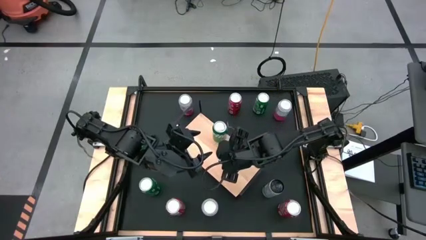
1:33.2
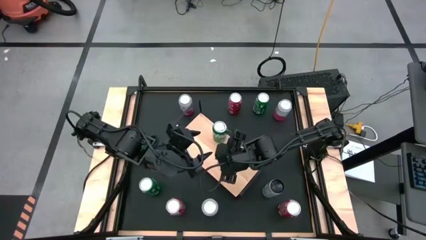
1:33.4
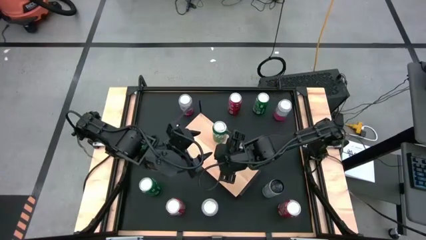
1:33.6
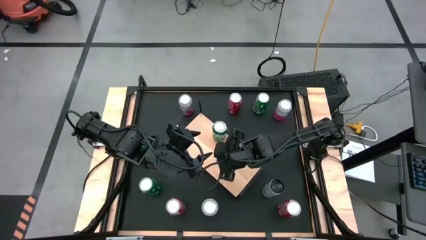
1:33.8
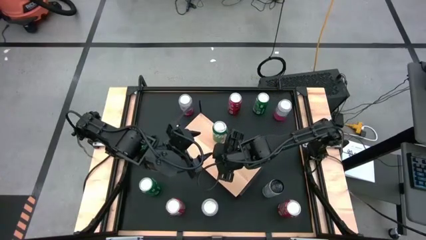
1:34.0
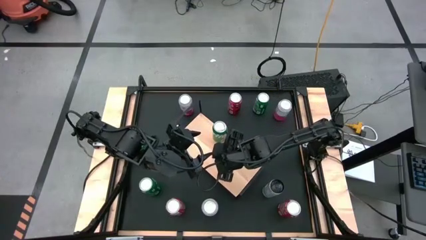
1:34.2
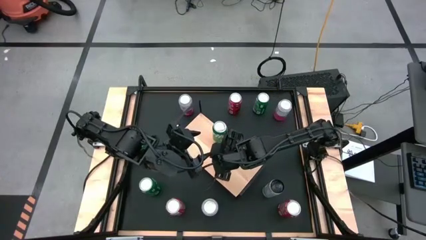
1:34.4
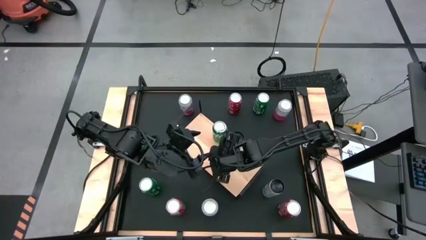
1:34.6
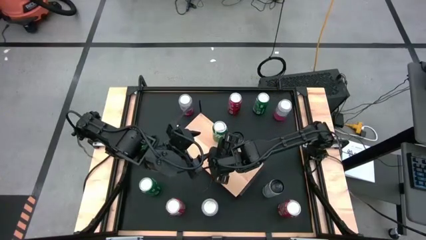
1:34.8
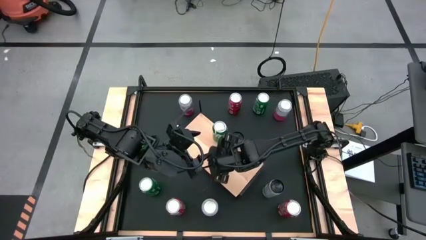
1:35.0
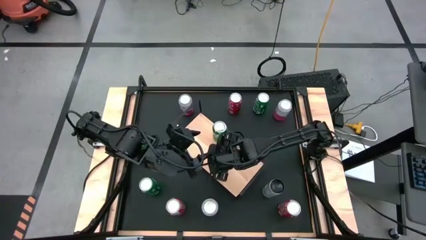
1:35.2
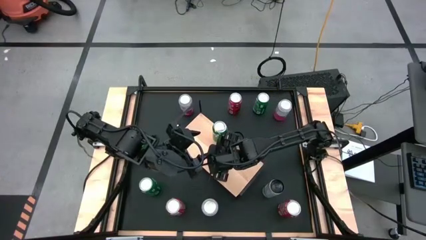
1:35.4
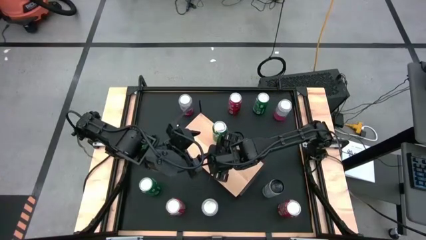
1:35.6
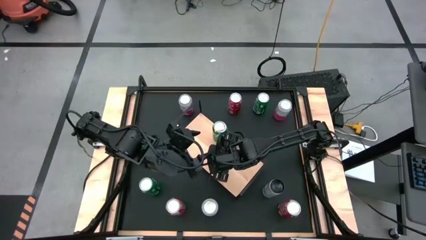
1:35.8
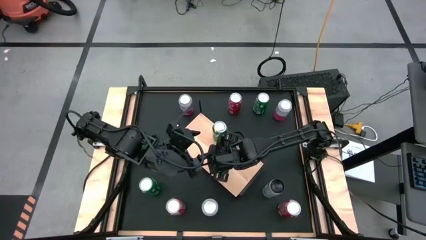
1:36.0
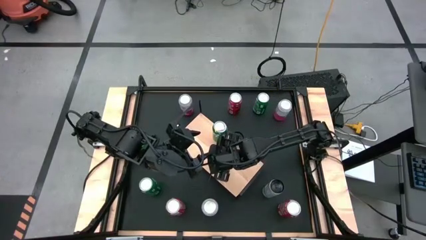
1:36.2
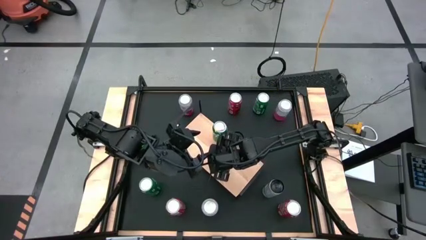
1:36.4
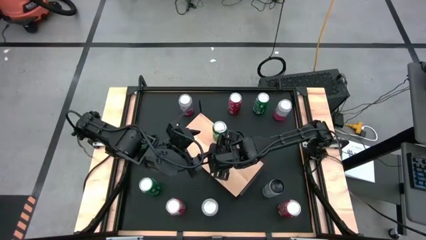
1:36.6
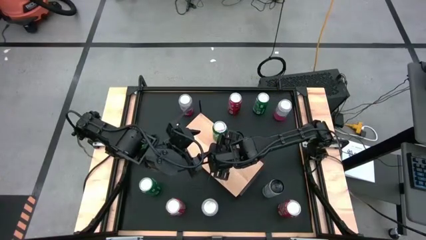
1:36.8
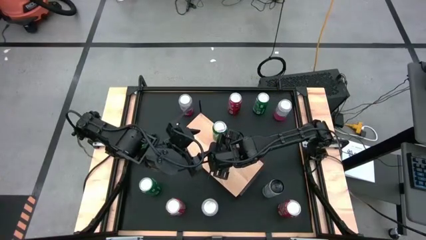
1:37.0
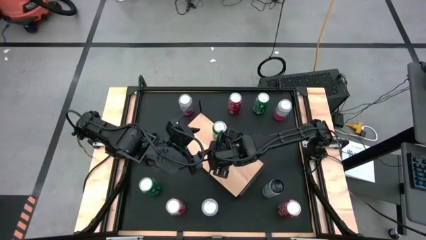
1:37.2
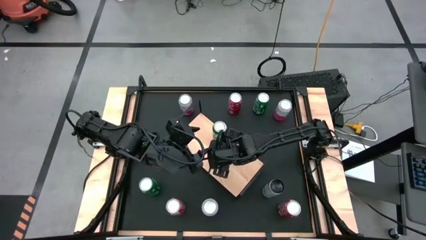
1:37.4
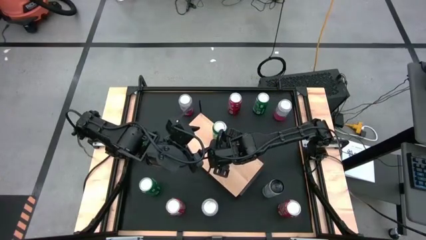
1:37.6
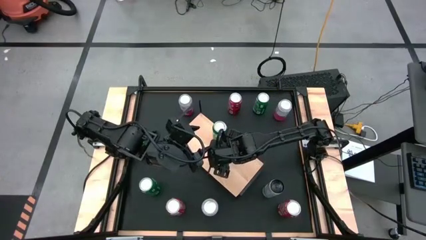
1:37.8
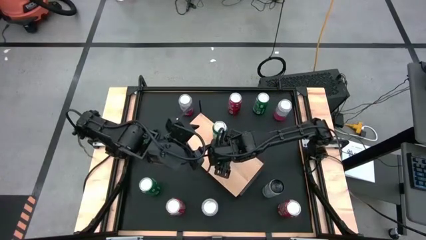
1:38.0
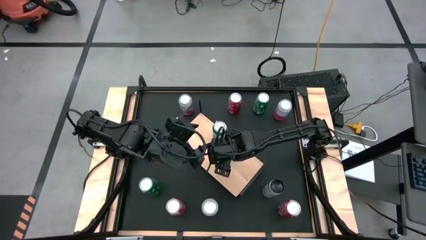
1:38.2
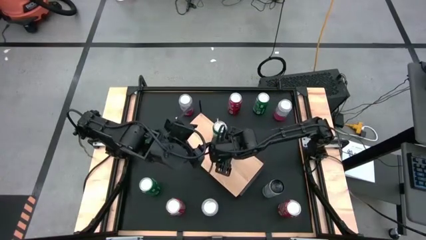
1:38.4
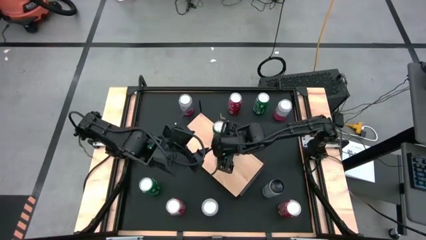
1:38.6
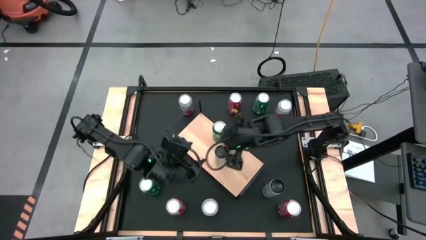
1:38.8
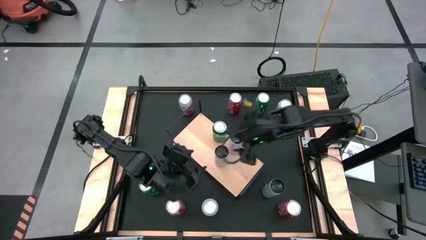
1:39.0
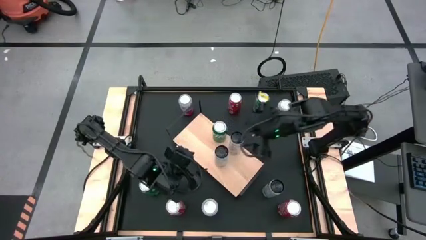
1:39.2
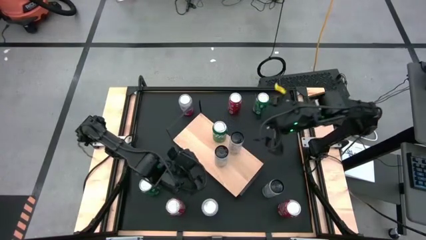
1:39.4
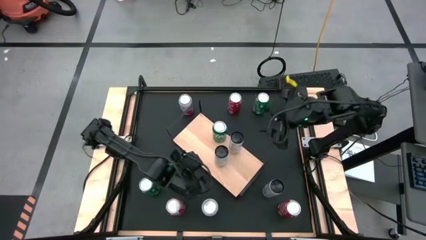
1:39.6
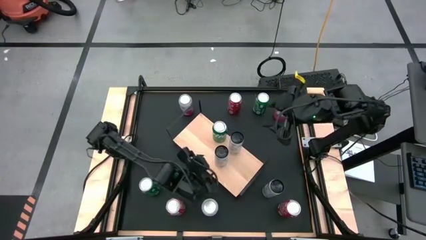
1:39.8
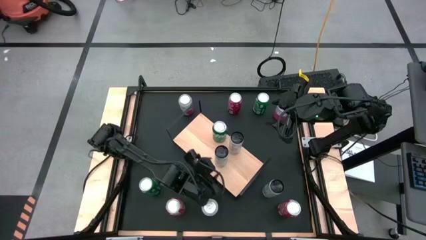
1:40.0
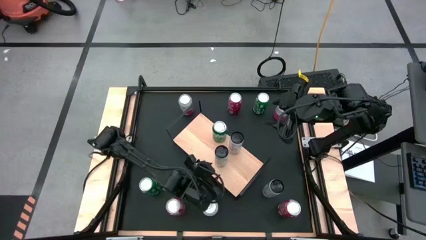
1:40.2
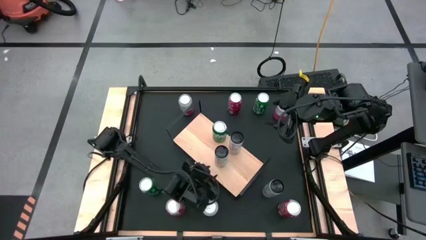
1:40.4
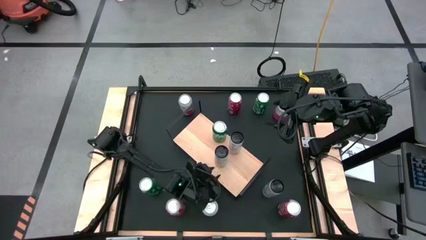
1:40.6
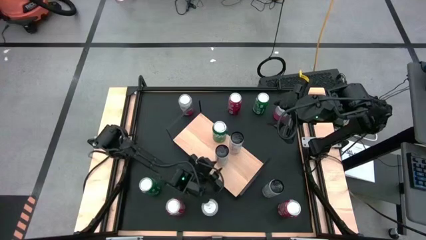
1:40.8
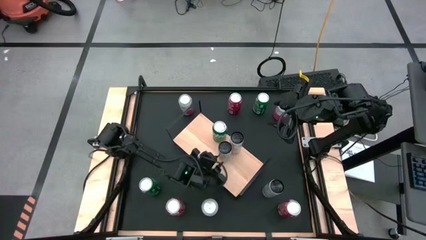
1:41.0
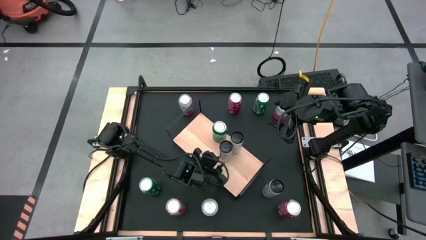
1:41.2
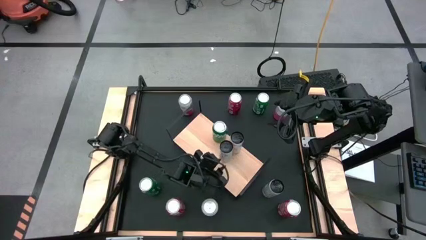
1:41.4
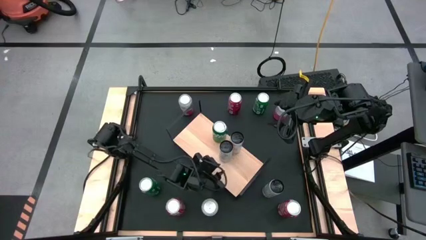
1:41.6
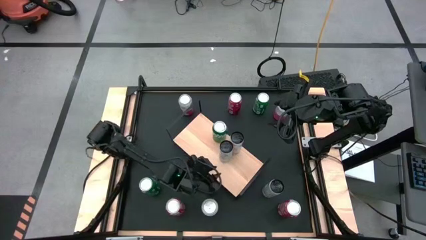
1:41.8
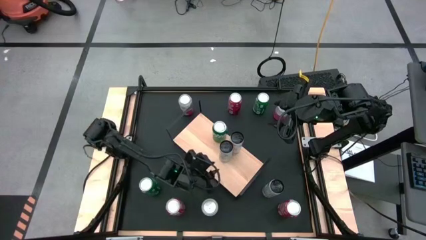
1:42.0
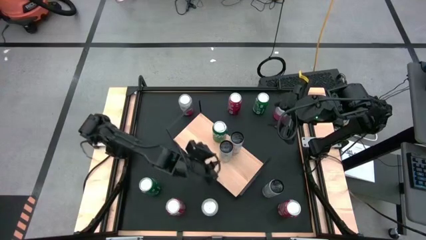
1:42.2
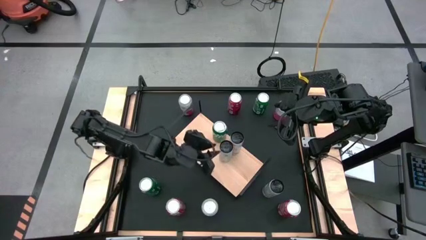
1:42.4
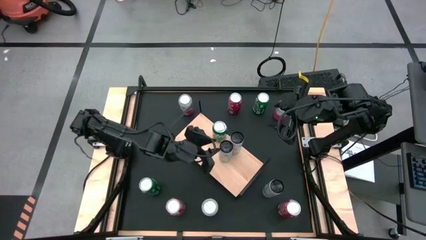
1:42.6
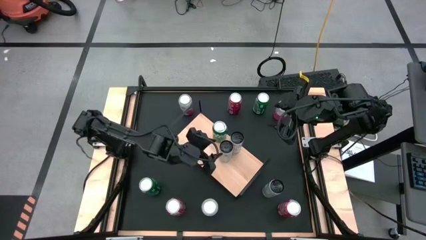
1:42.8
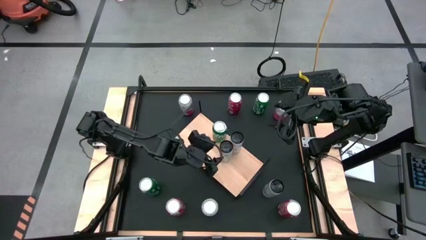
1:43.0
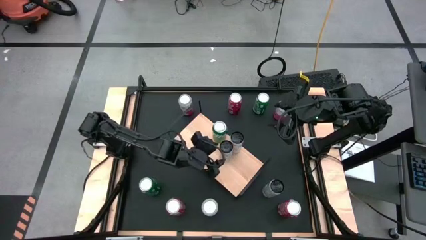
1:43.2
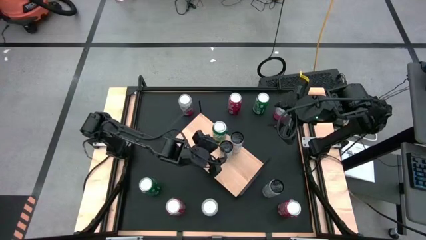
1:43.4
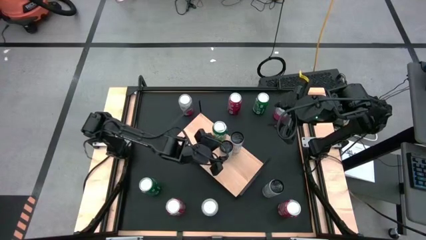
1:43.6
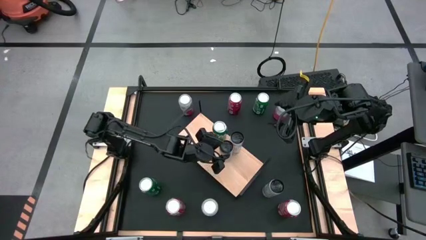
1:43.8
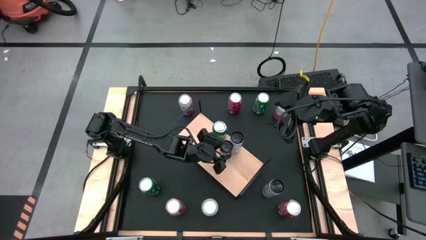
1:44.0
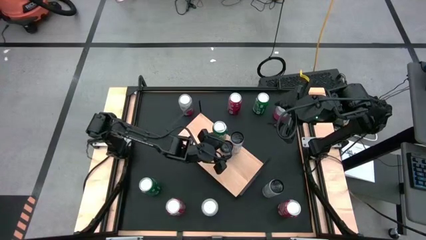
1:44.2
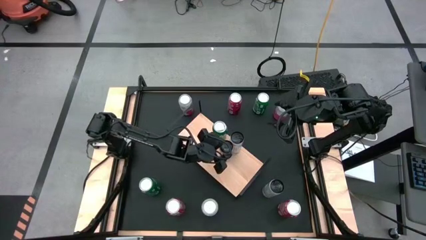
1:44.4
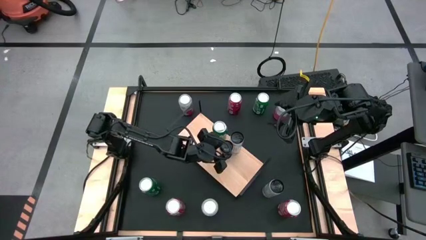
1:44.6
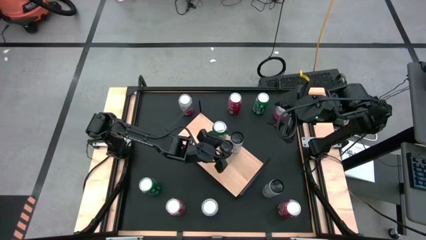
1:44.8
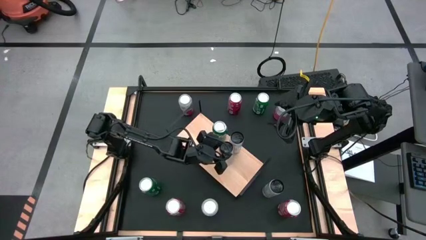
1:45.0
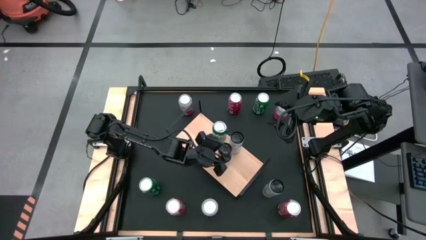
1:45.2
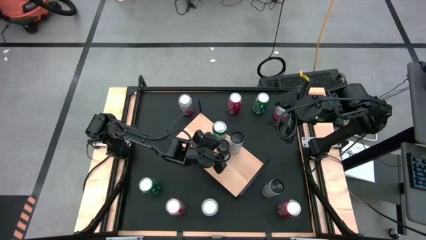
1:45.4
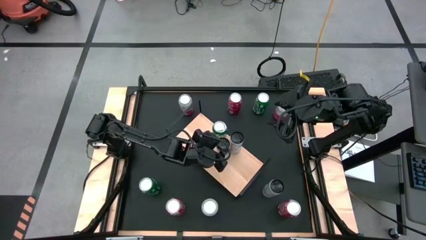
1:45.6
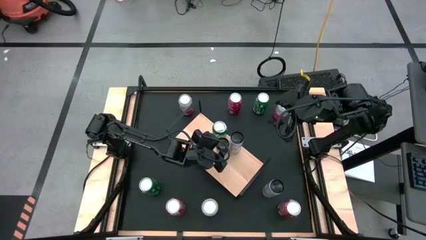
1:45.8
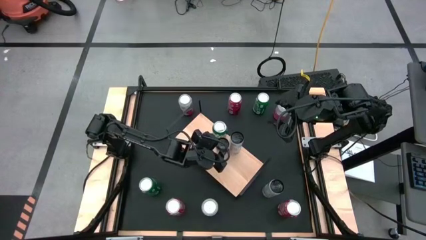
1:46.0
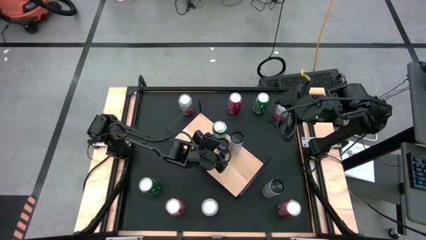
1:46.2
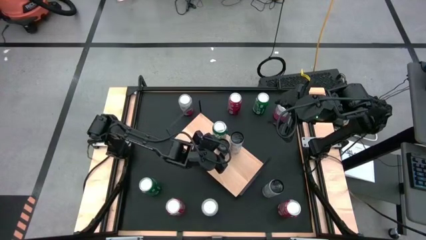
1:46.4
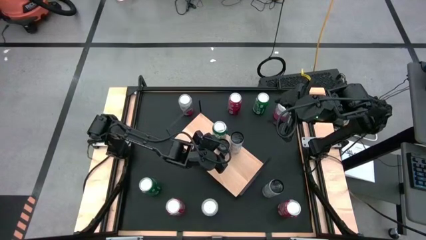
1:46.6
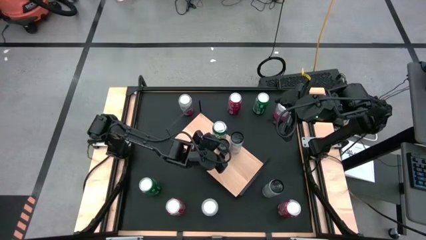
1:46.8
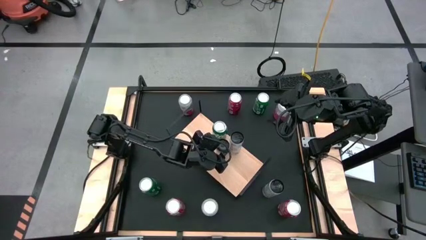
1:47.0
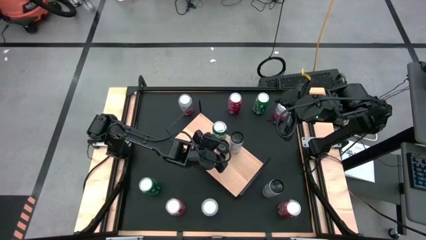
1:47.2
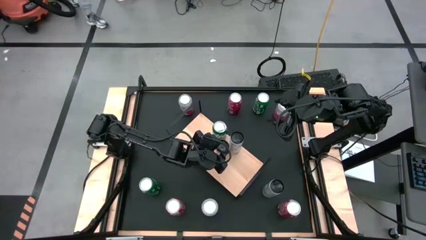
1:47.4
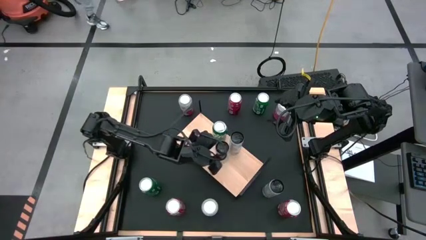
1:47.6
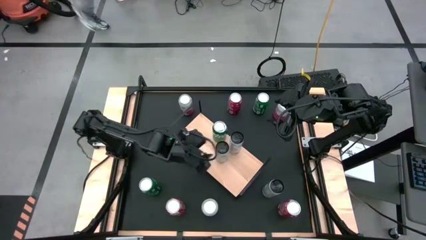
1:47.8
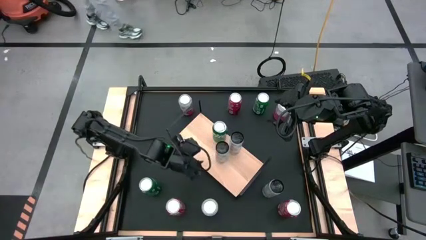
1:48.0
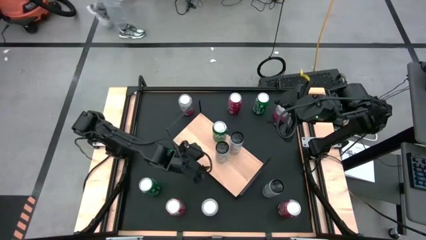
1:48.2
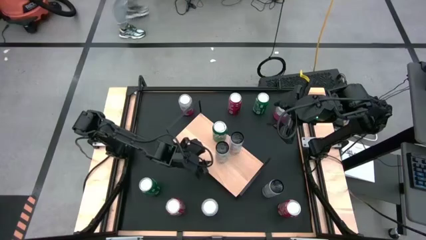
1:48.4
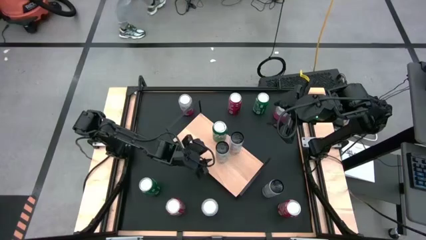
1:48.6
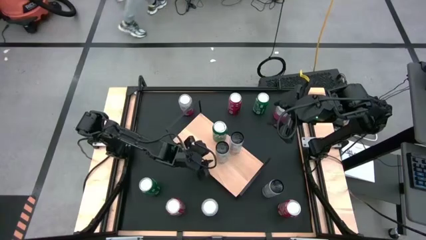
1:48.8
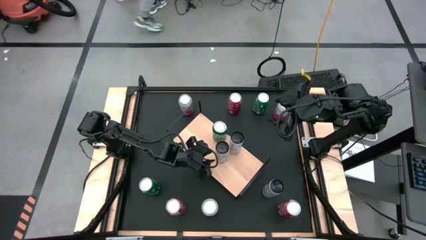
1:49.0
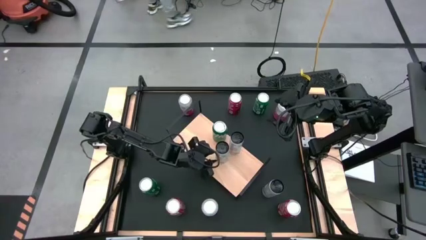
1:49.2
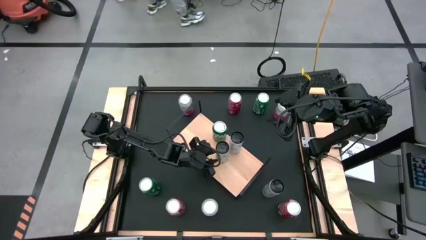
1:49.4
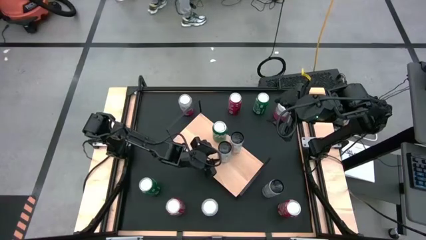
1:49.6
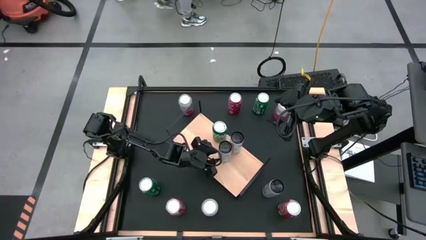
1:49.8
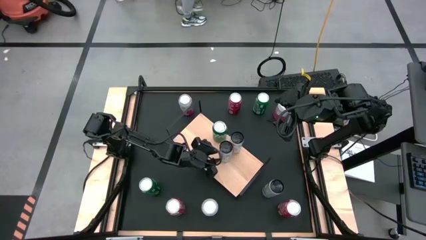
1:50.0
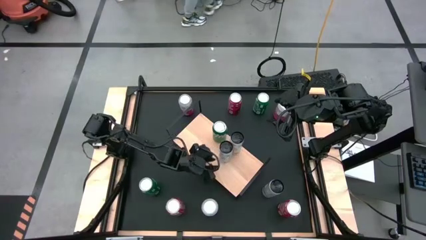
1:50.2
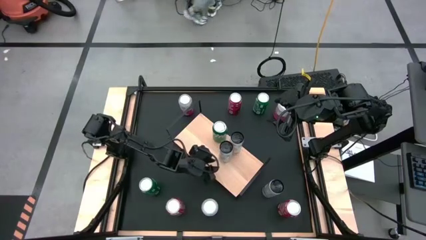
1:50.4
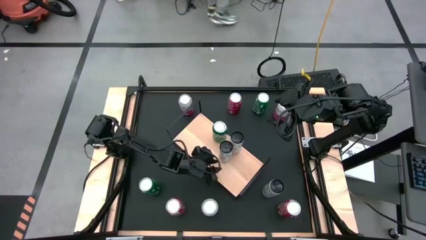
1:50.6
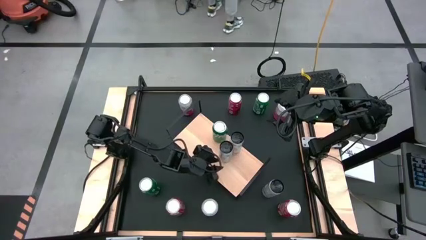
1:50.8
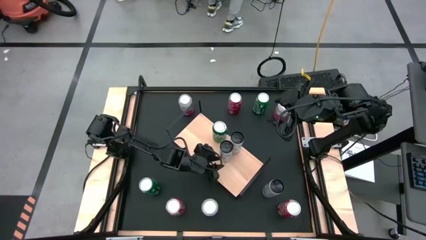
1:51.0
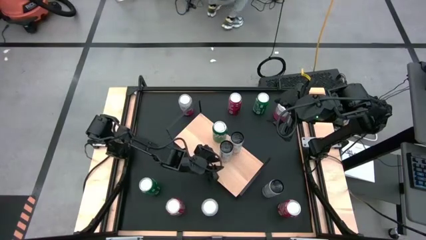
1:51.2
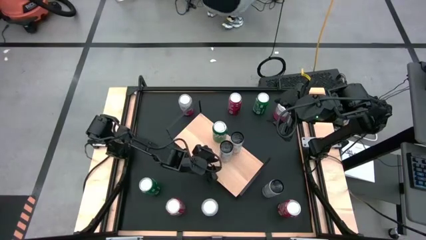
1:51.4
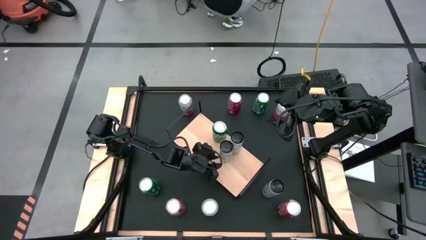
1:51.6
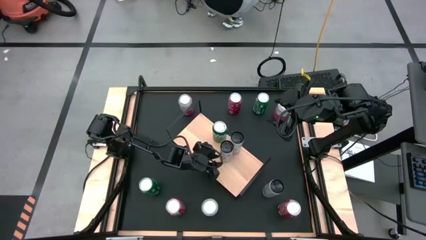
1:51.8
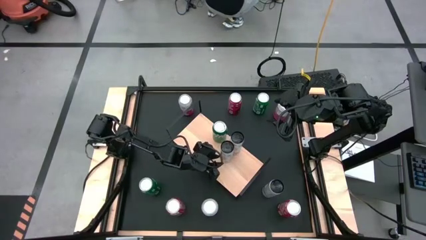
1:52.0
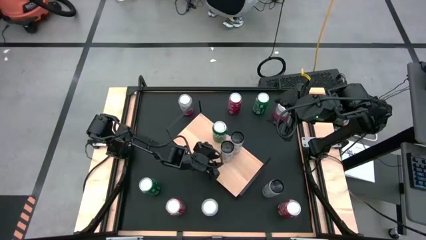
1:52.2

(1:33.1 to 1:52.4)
Task: Place canned beverage on shelf
Put the left white soda can aligned with the other white soda can
